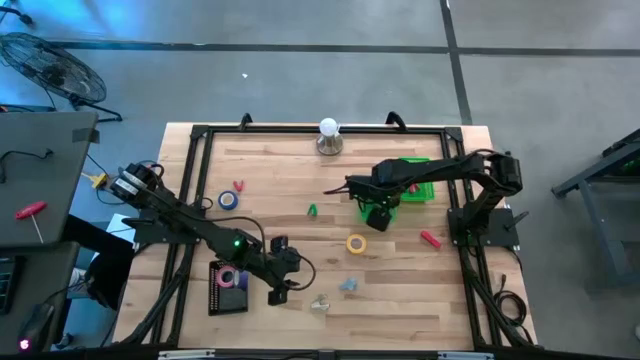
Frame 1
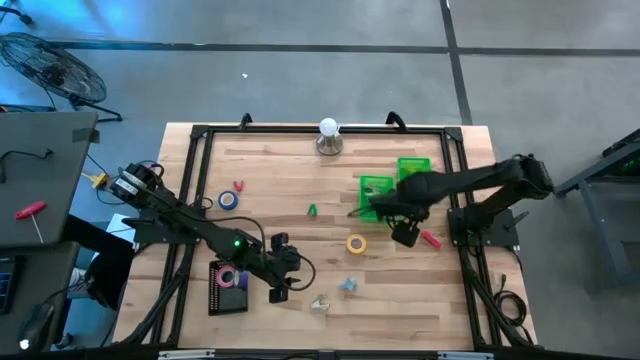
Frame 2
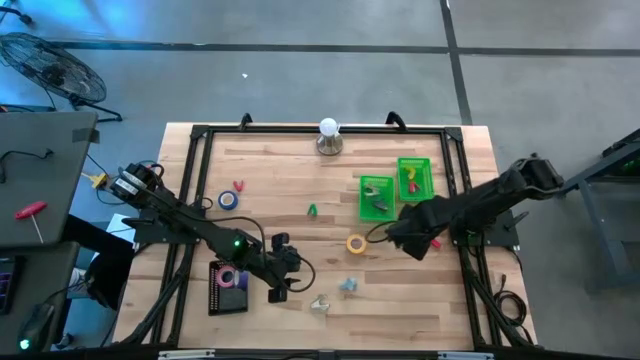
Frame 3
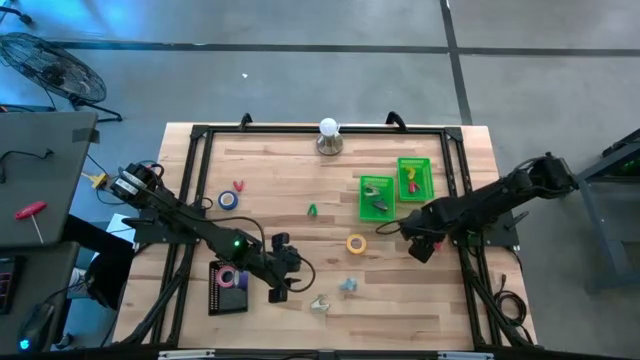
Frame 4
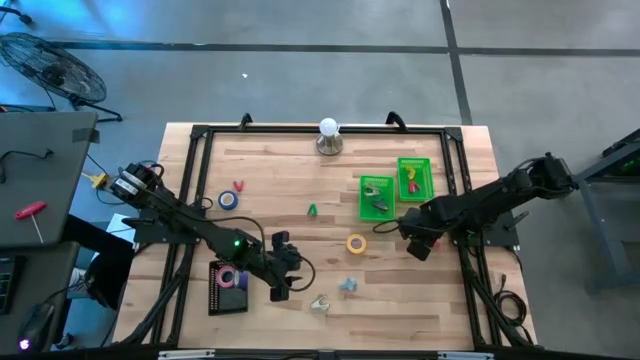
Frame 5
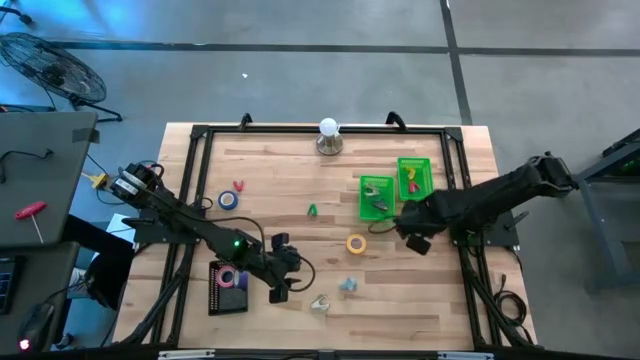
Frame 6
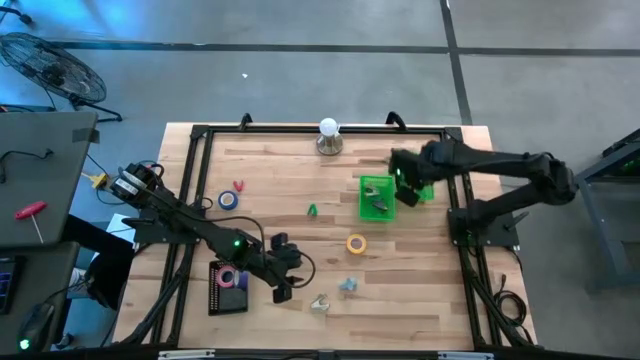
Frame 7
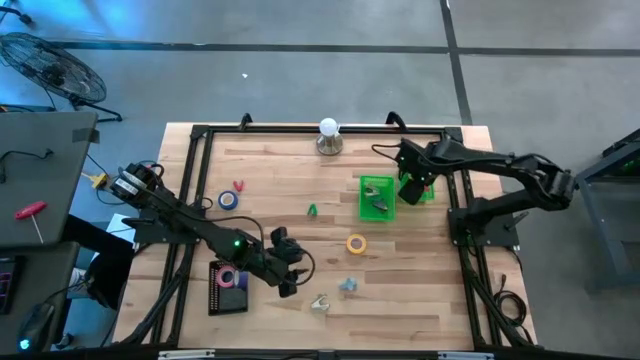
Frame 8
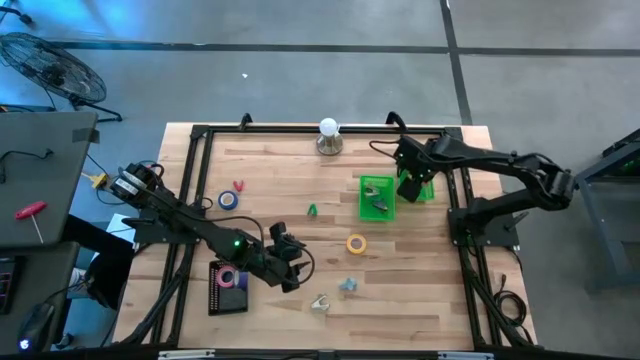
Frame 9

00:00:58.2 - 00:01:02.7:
Task: Pick and place Stapler, Stapler remover, tape
Put the right red stapler into the right green basket

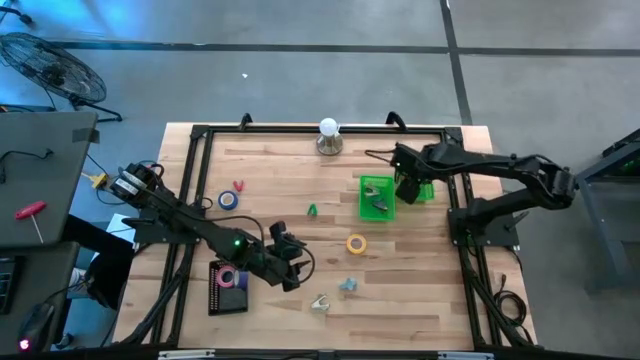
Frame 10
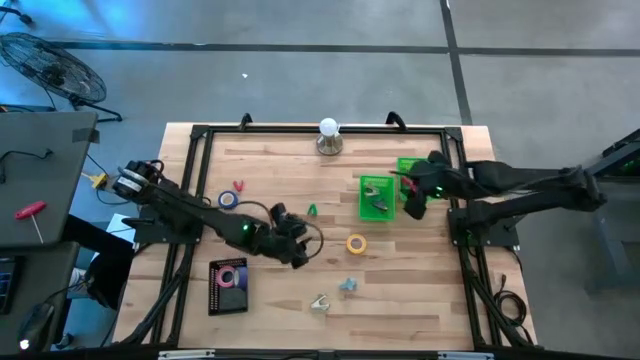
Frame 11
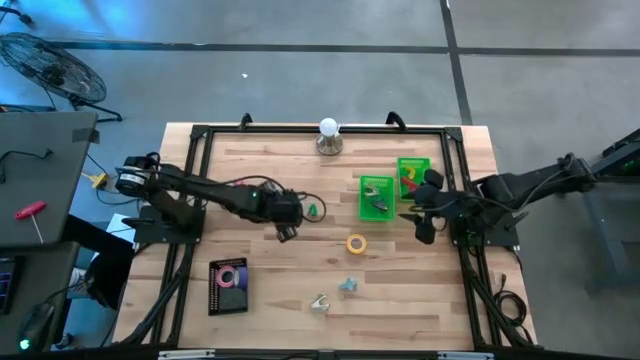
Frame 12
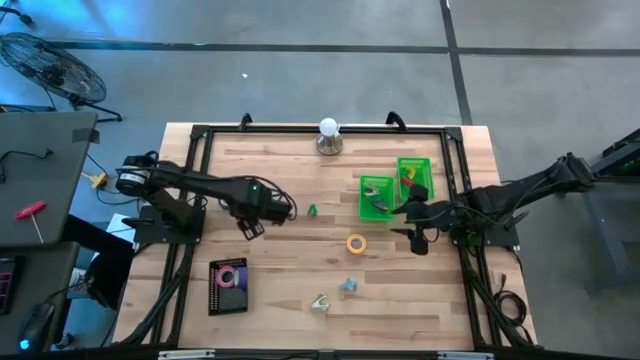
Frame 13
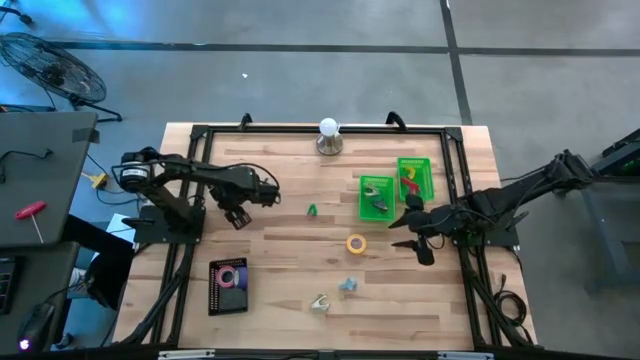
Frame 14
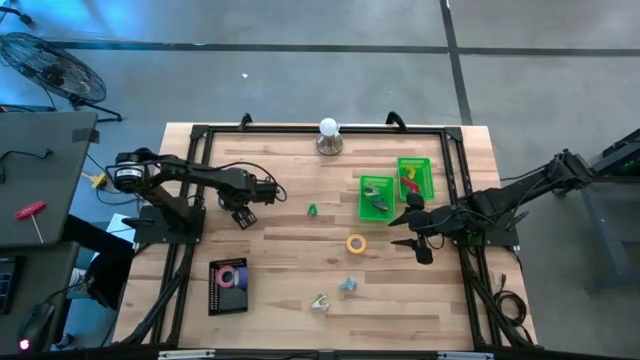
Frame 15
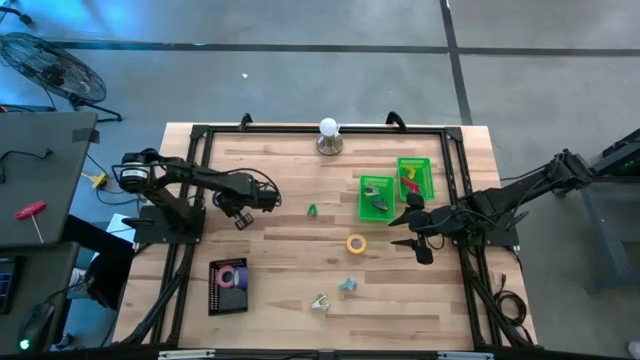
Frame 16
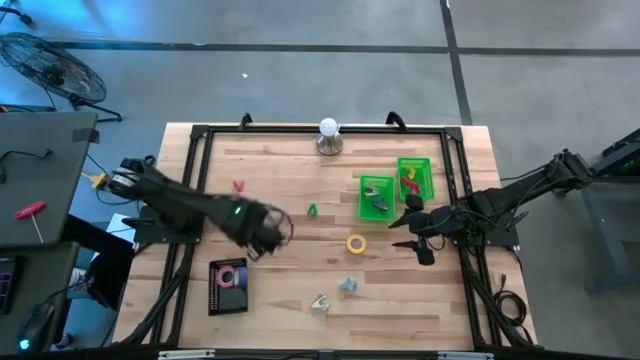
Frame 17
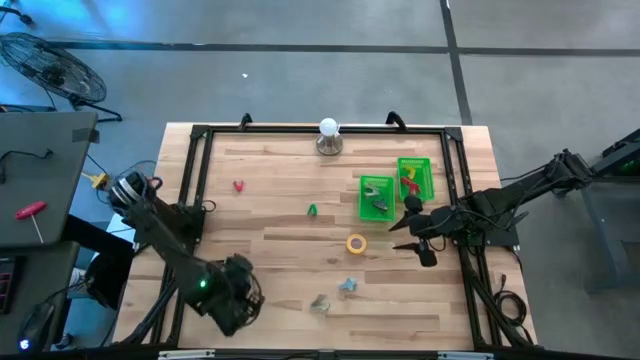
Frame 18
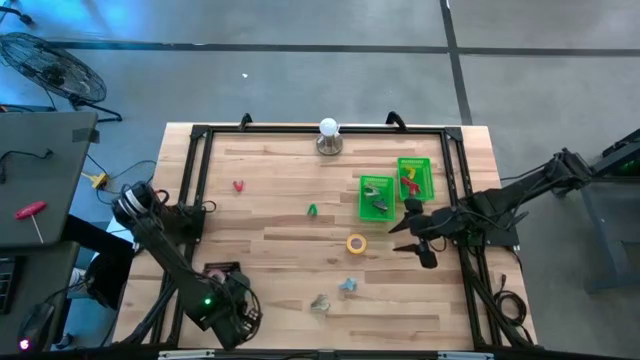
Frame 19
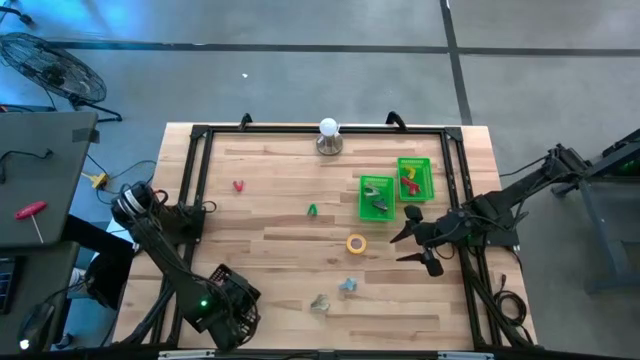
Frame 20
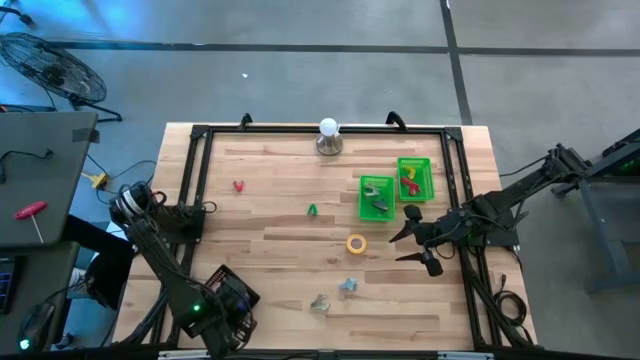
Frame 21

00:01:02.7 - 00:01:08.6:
Put the blue tape into the black basket

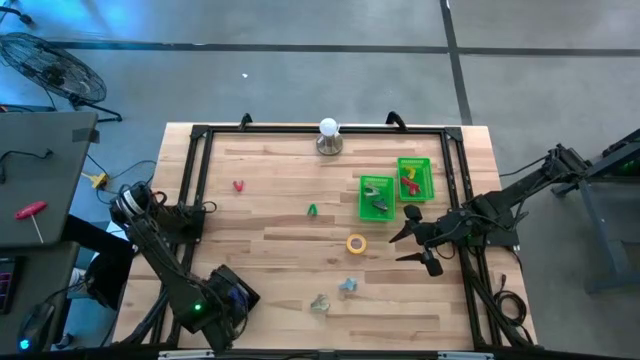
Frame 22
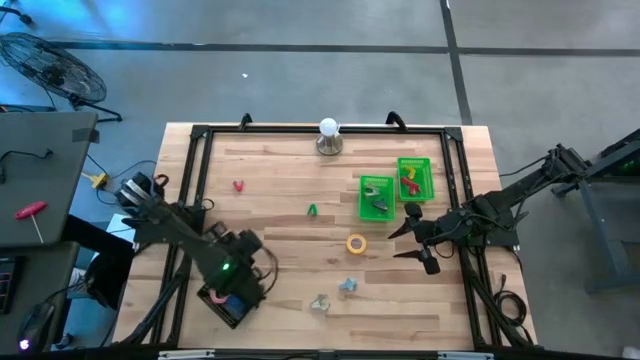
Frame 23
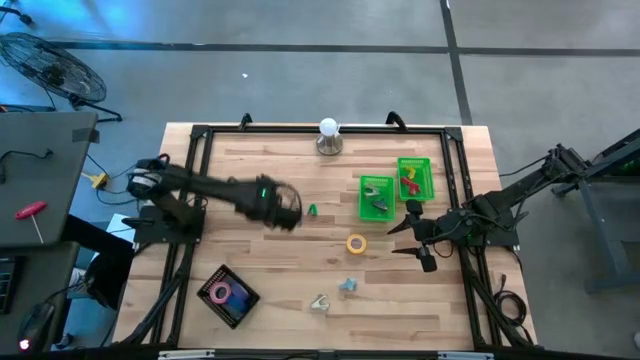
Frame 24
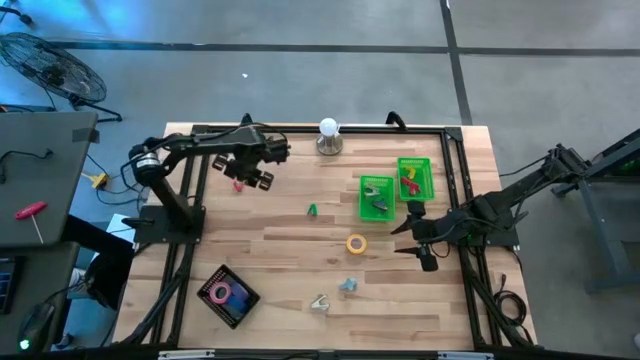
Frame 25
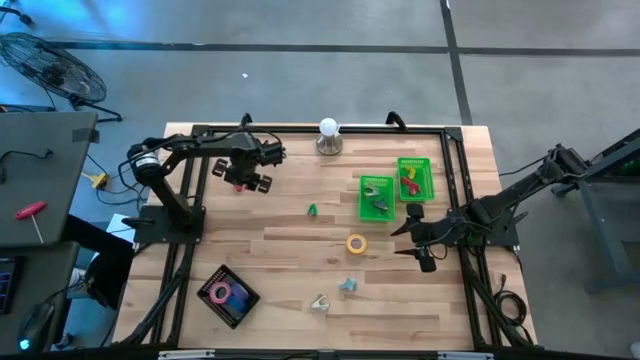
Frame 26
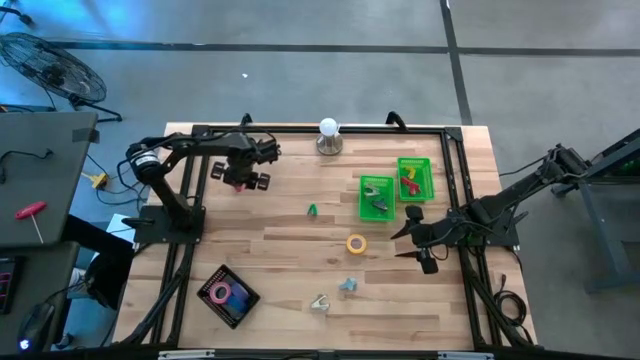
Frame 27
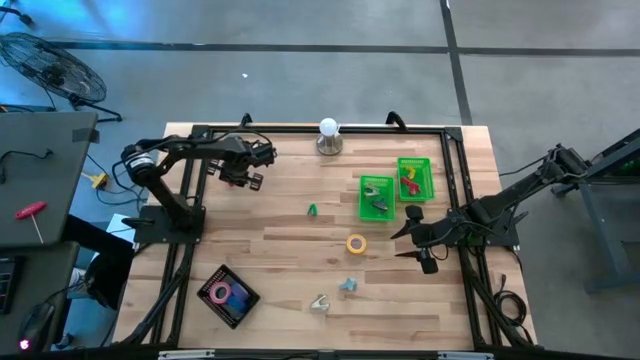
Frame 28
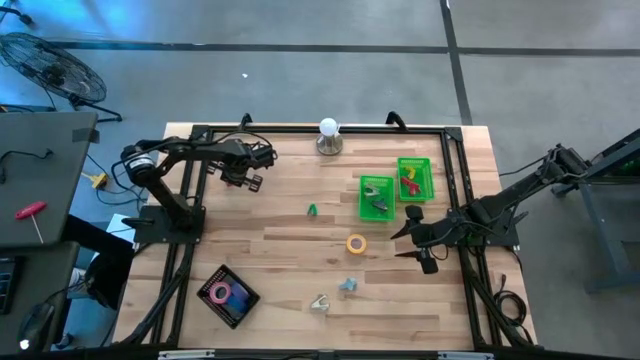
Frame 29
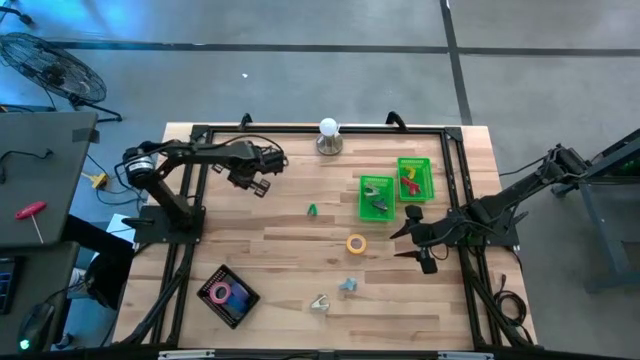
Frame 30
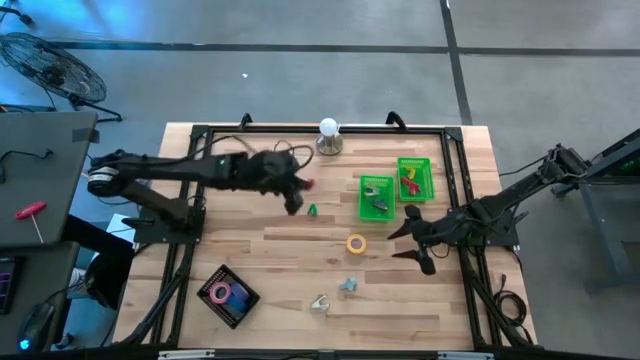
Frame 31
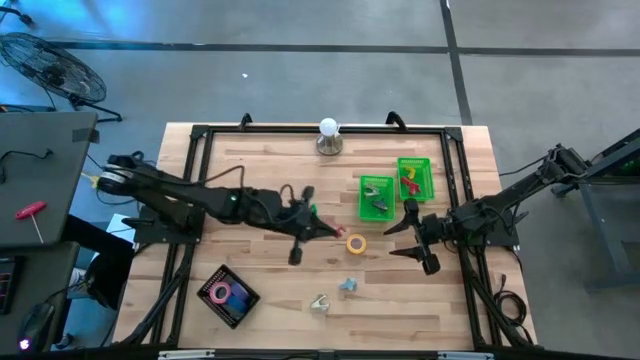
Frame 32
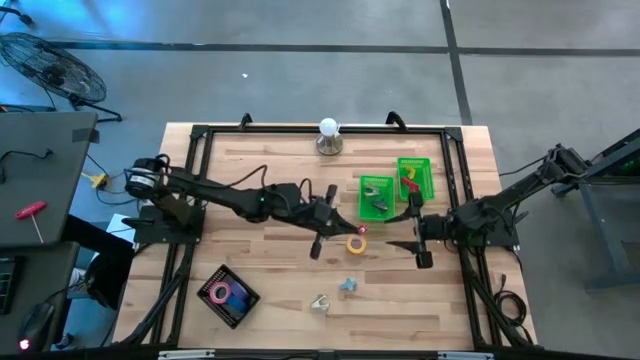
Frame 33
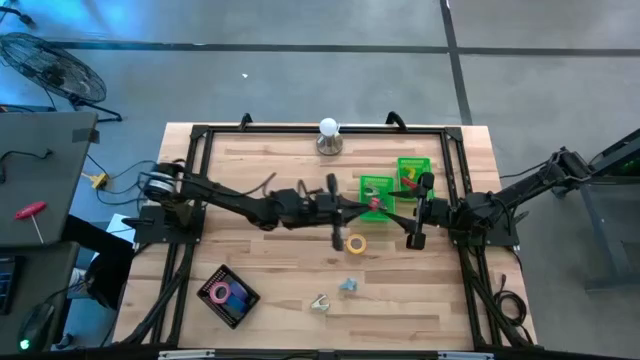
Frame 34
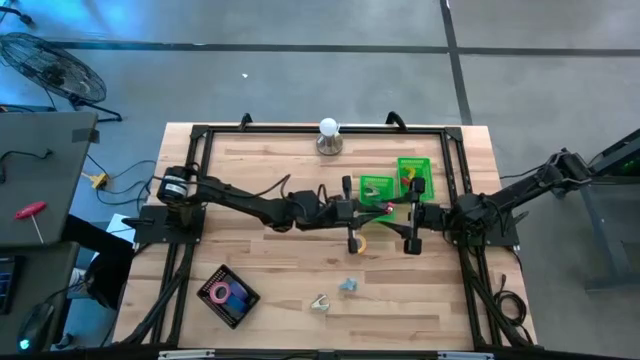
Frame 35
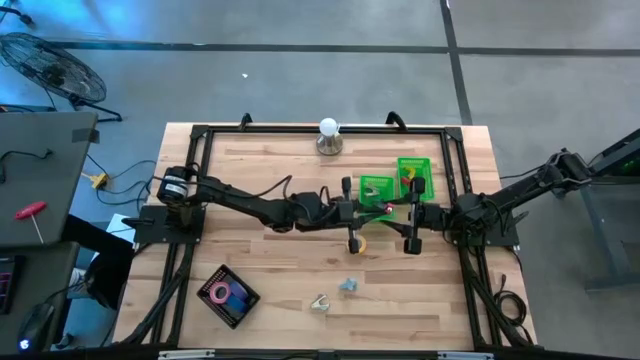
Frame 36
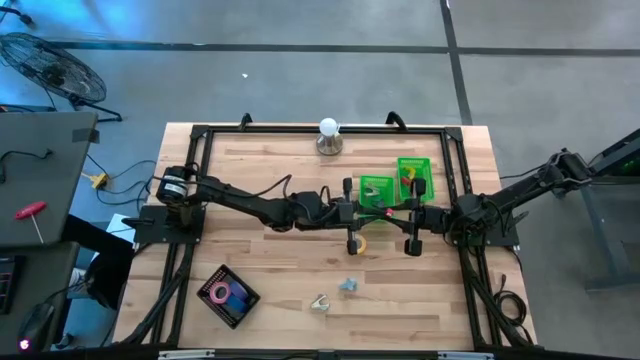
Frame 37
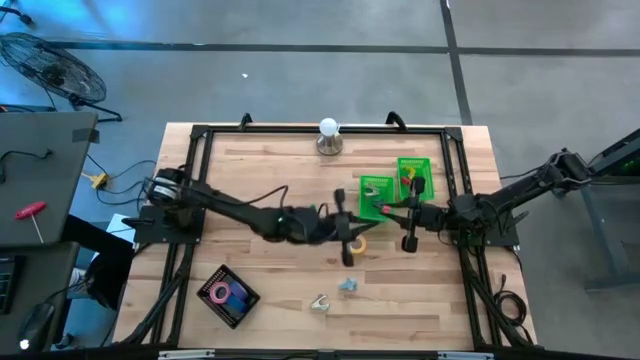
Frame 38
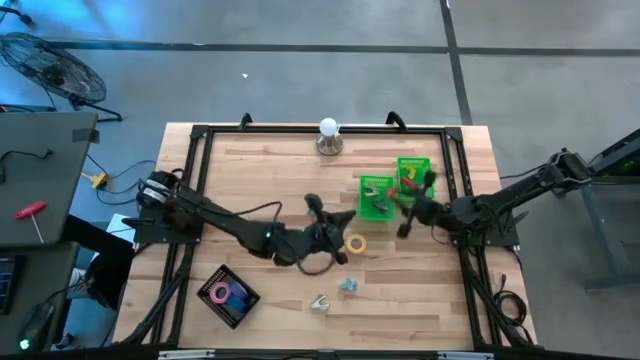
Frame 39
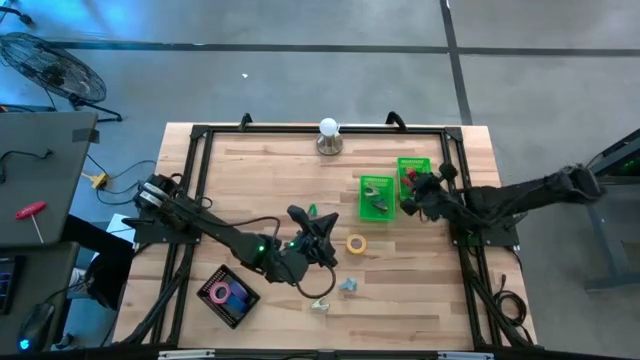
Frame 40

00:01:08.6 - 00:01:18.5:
Put the red stapler into the right green basket

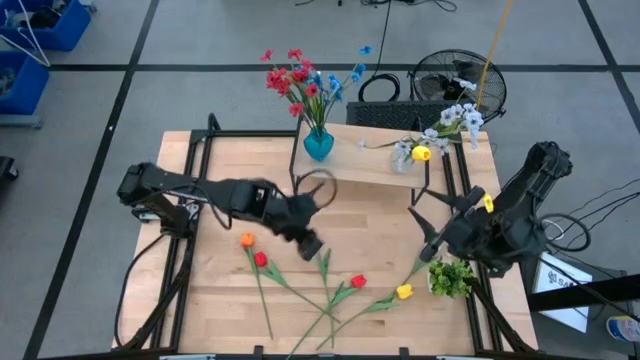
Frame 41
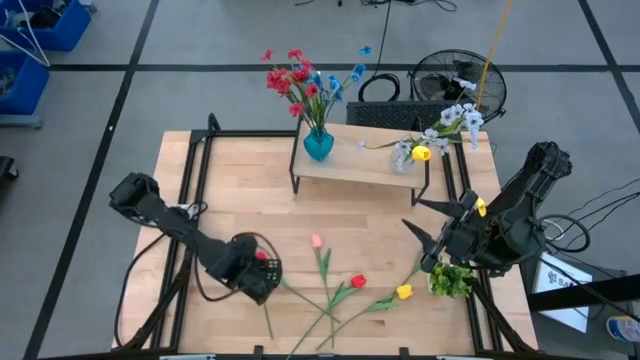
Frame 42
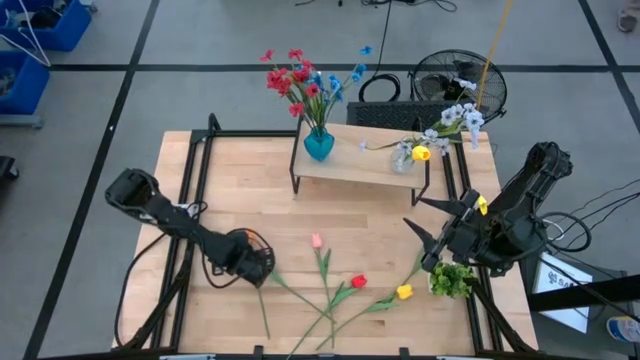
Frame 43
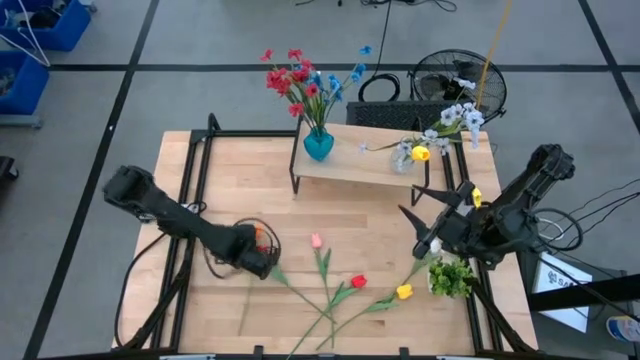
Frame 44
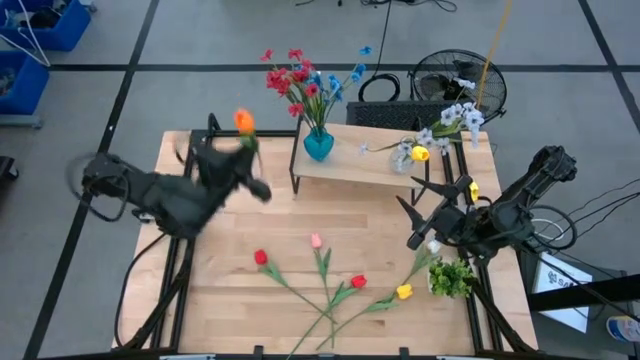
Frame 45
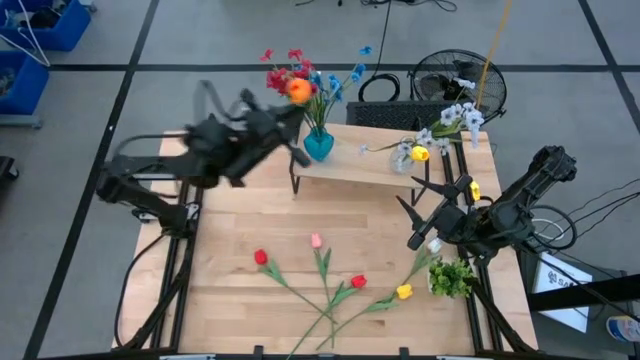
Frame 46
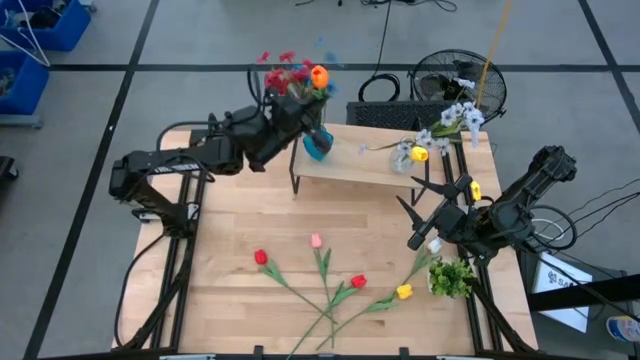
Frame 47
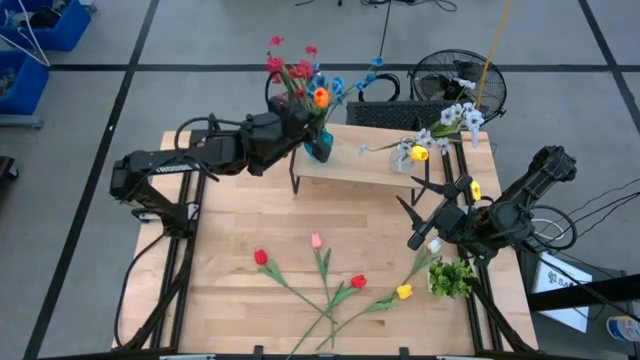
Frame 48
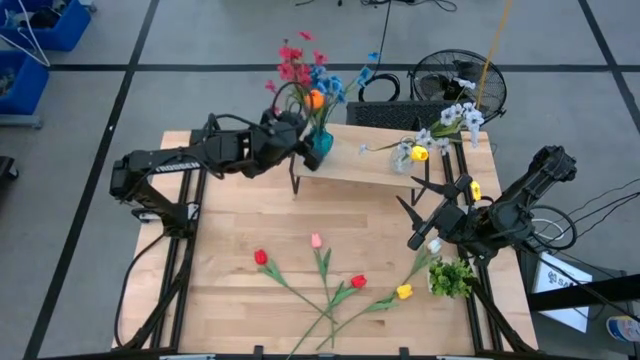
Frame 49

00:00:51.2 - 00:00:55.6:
Task: Pick and place flowers into a vace then onto a shelf
Put the orange tulip into the blue vase on the shelf
